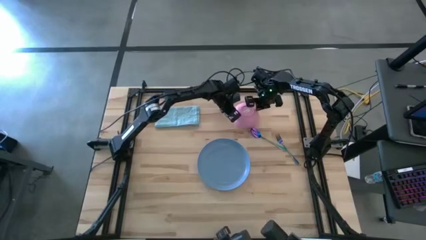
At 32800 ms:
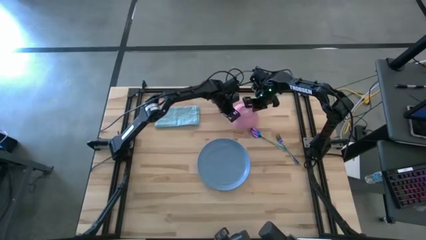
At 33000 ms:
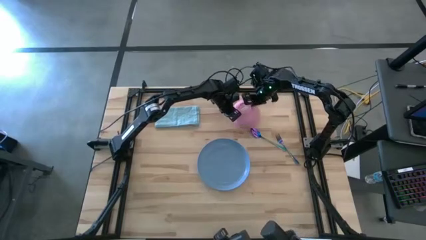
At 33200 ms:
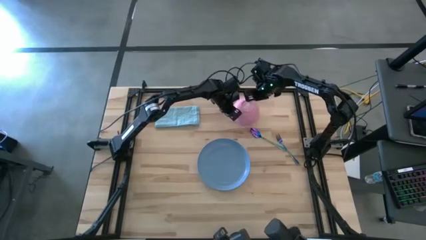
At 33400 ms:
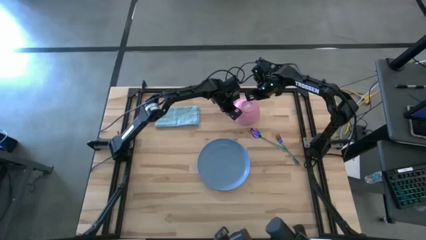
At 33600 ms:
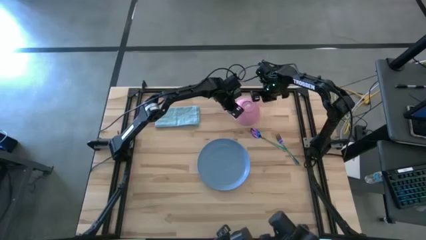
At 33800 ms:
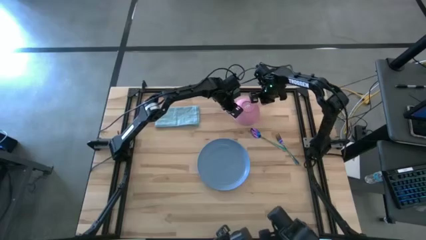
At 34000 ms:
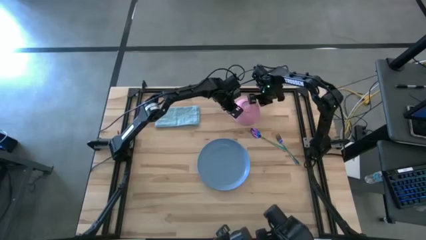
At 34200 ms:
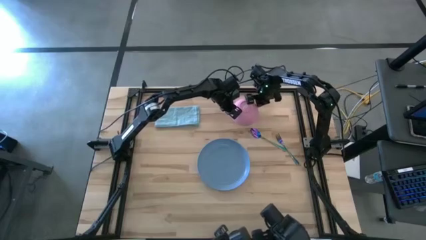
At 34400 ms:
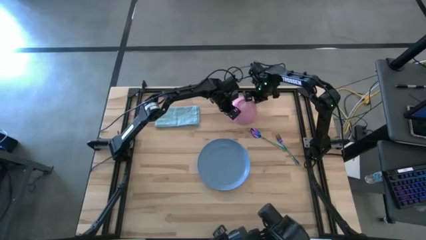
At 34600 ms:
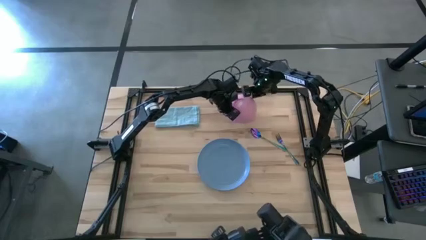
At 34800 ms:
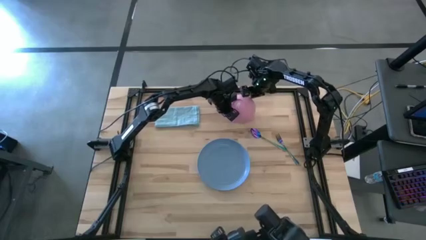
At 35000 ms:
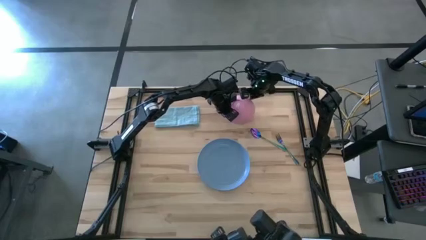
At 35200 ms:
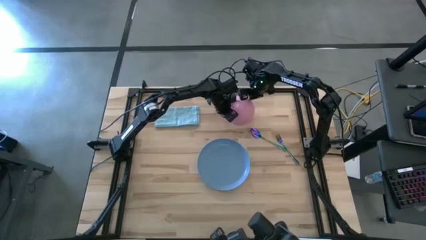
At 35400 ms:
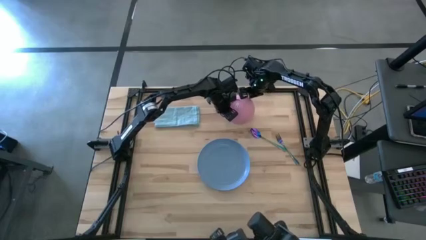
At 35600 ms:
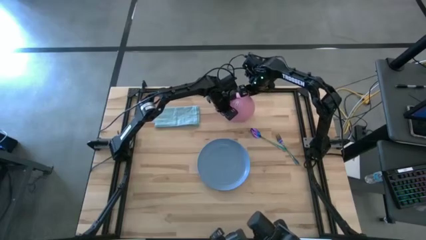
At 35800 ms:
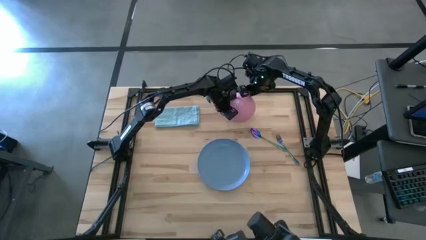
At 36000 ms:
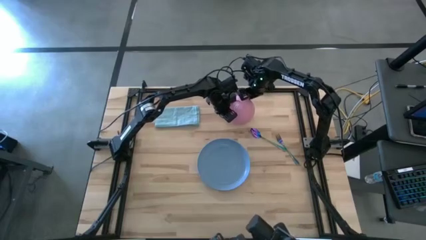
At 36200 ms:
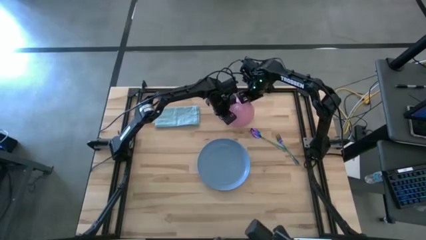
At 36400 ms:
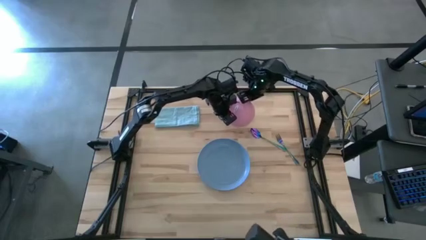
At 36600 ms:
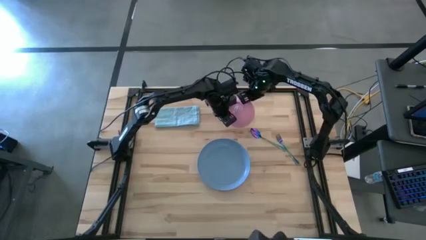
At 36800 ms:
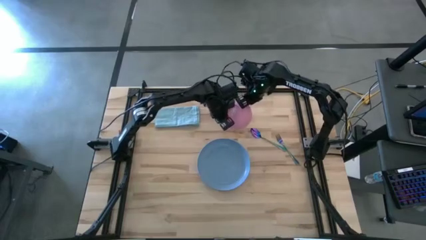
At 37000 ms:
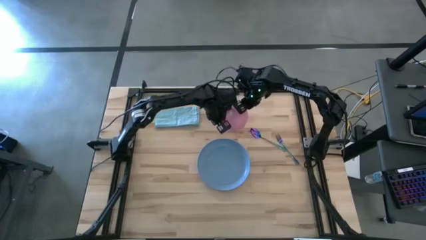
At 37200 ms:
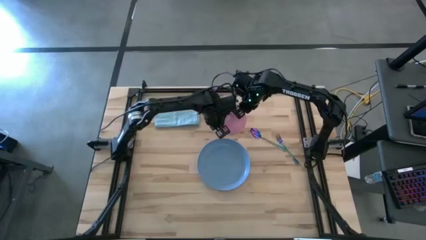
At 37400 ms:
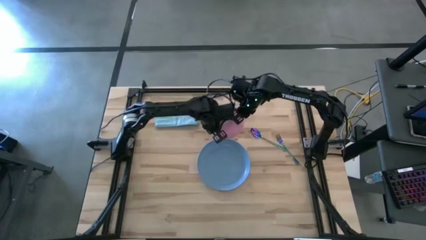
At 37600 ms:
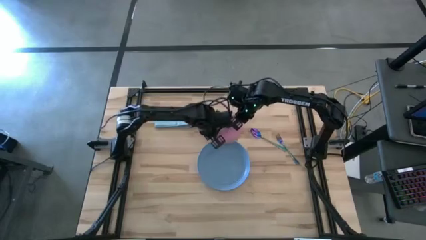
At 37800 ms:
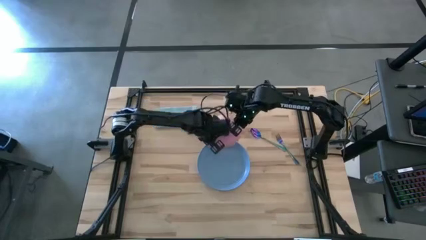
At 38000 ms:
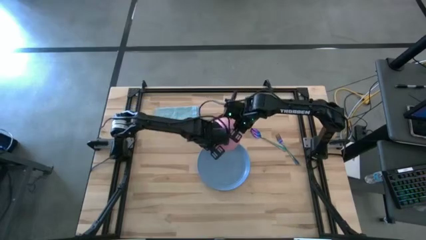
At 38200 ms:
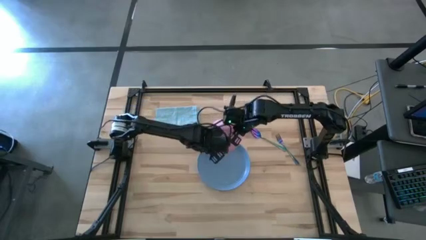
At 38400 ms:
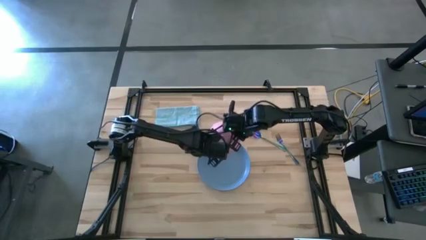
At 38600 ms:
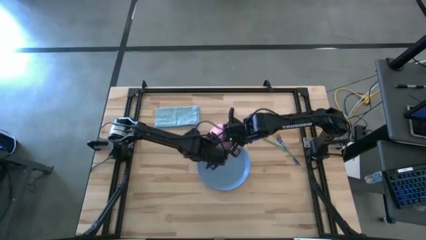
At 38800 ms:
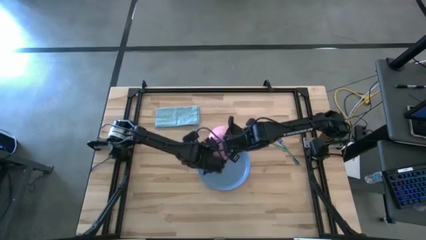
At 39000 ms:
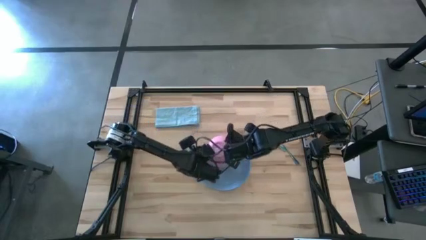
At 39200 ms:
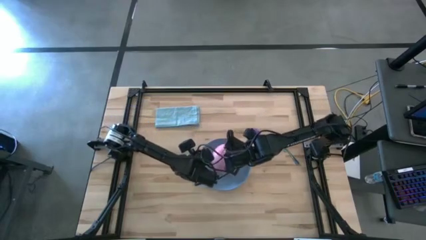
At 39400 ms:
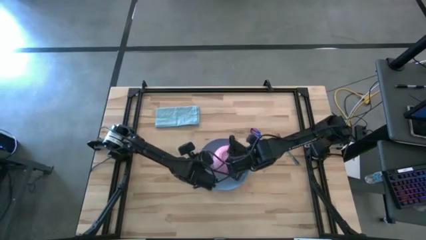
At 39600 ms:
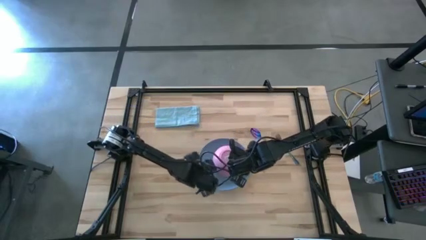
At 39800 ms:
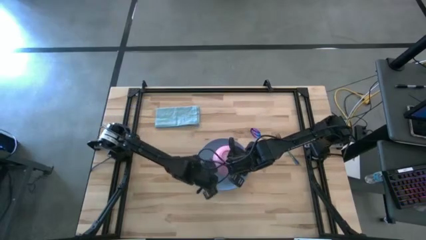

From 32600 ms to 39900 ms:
Task: Set table place
Put the pink bowl on top of the blue plate

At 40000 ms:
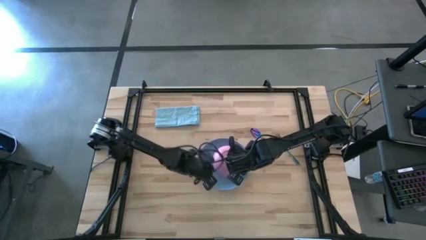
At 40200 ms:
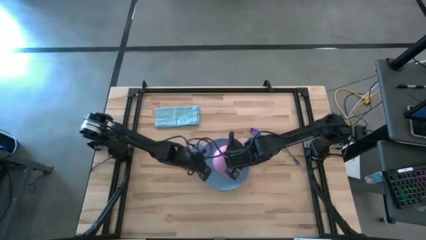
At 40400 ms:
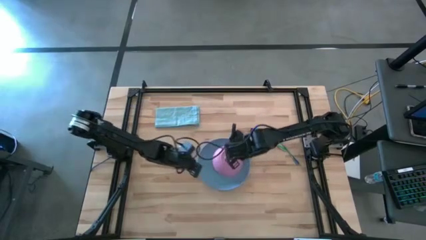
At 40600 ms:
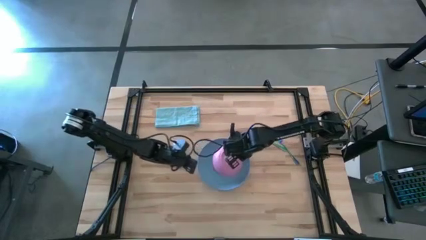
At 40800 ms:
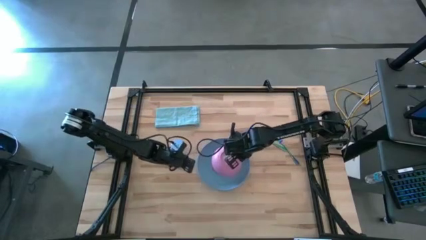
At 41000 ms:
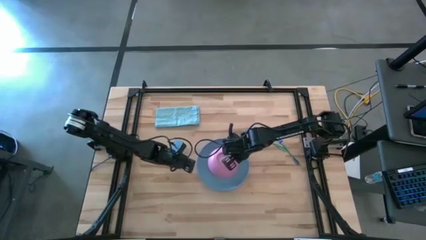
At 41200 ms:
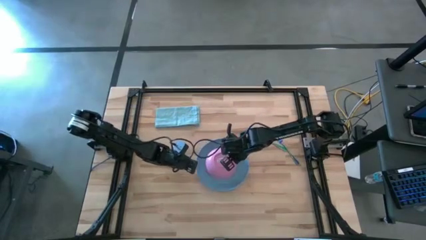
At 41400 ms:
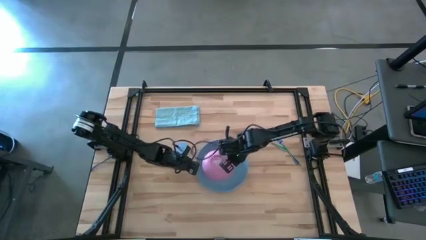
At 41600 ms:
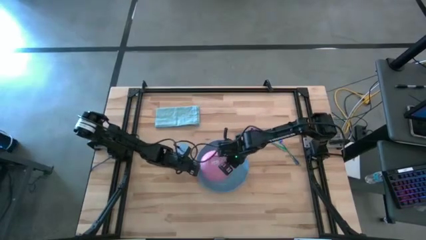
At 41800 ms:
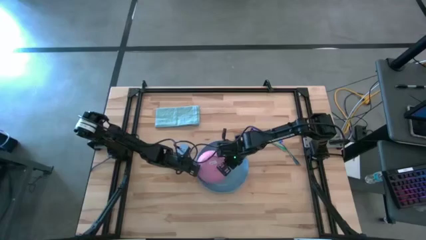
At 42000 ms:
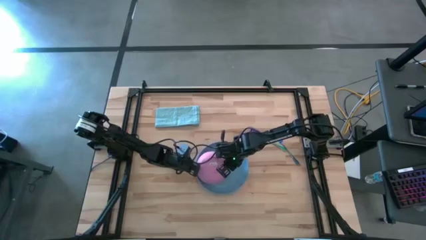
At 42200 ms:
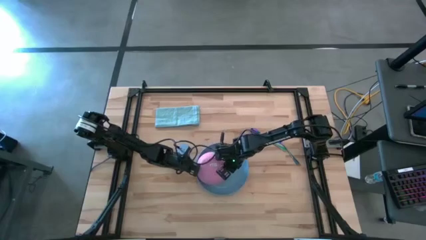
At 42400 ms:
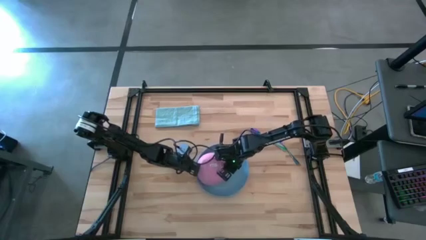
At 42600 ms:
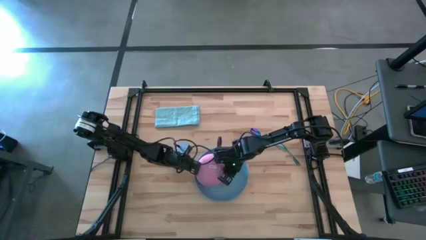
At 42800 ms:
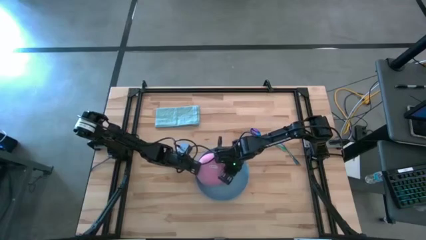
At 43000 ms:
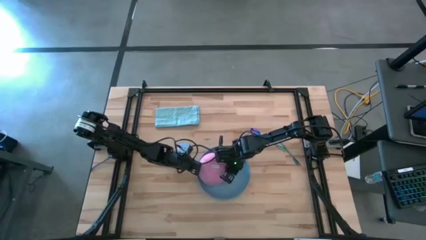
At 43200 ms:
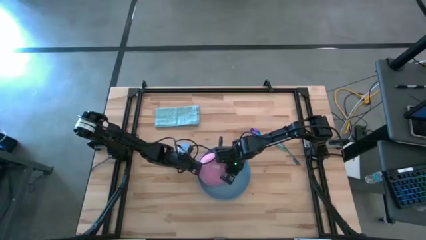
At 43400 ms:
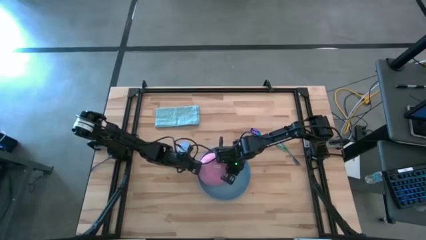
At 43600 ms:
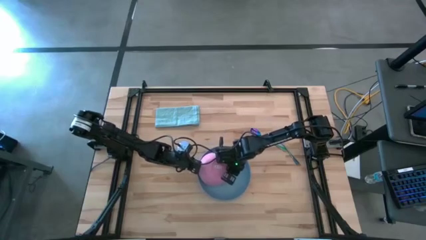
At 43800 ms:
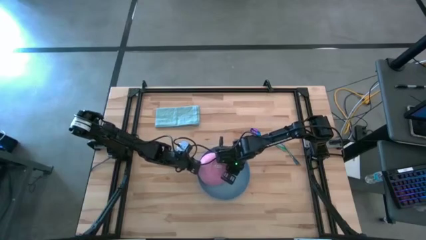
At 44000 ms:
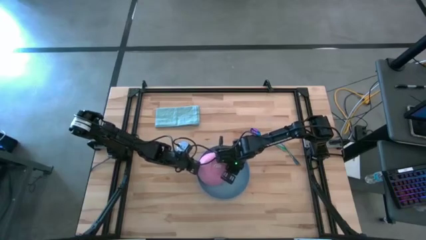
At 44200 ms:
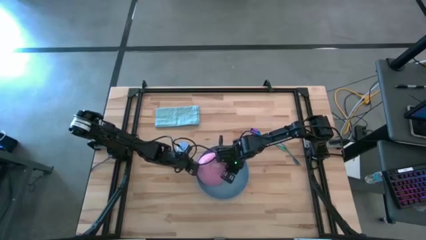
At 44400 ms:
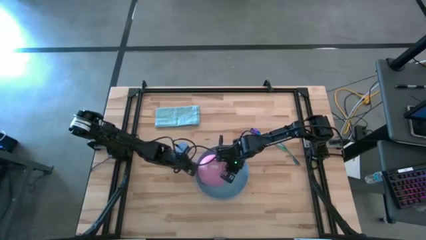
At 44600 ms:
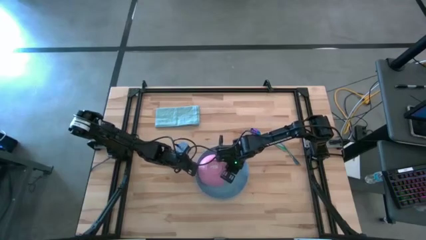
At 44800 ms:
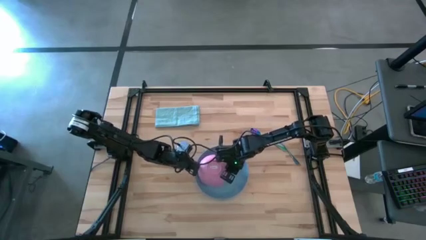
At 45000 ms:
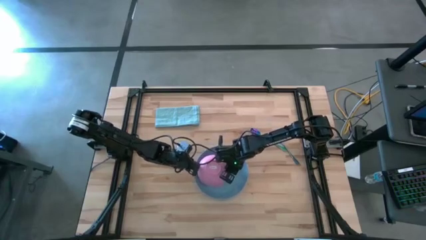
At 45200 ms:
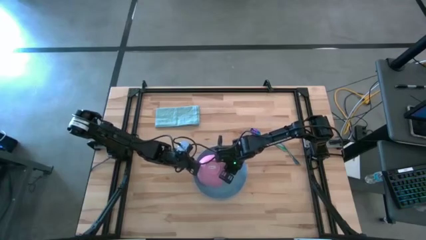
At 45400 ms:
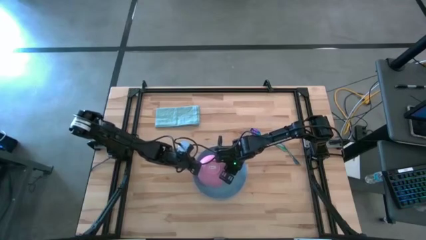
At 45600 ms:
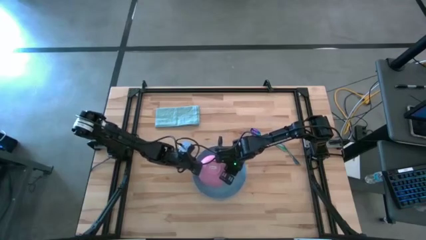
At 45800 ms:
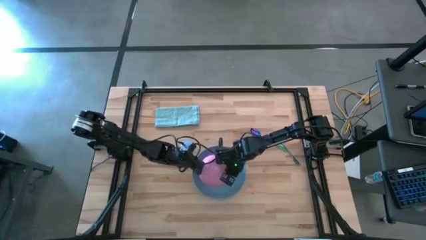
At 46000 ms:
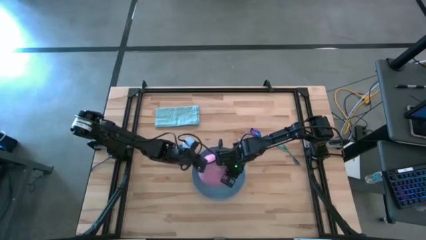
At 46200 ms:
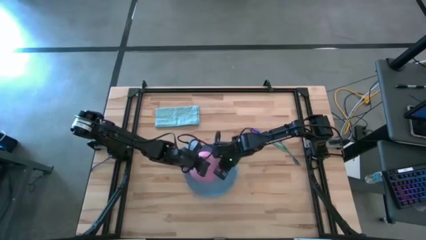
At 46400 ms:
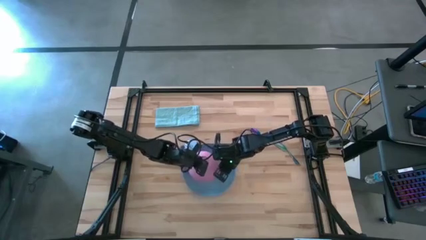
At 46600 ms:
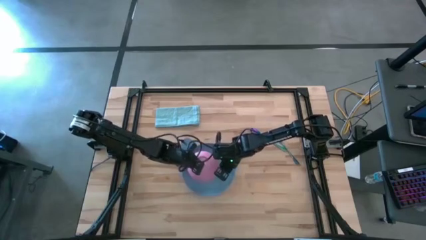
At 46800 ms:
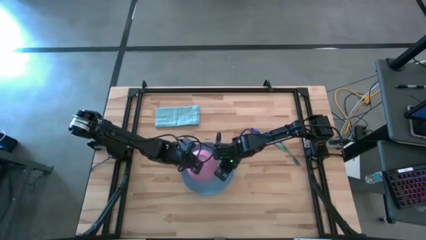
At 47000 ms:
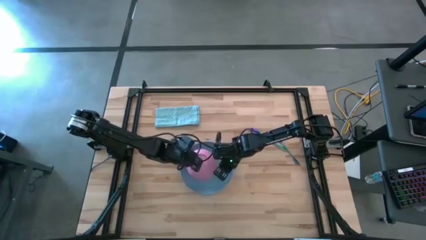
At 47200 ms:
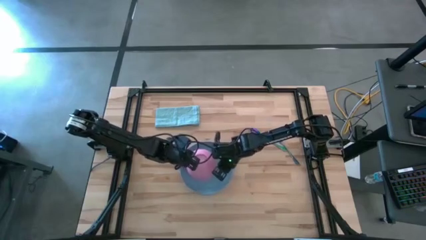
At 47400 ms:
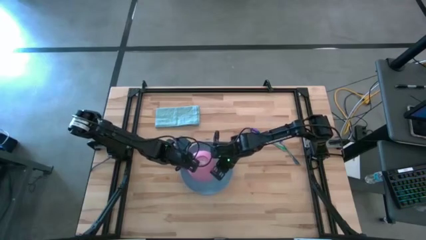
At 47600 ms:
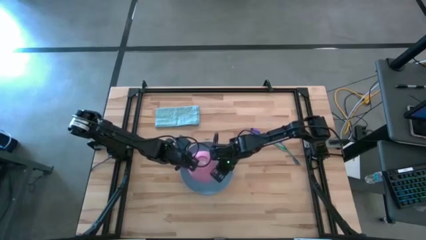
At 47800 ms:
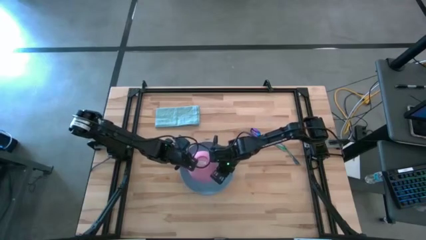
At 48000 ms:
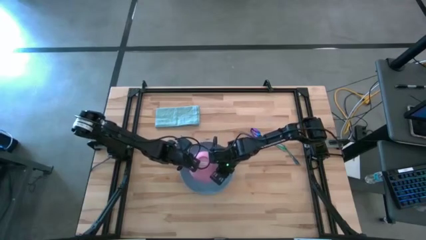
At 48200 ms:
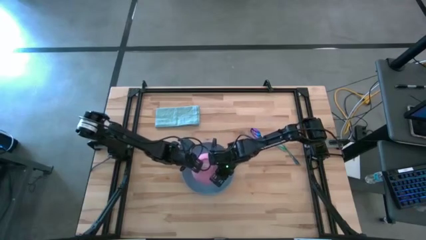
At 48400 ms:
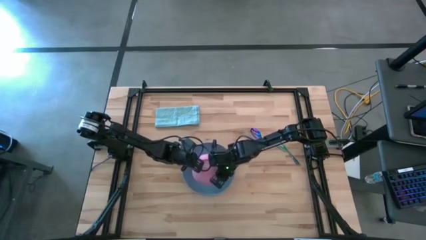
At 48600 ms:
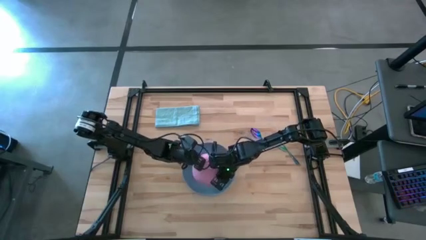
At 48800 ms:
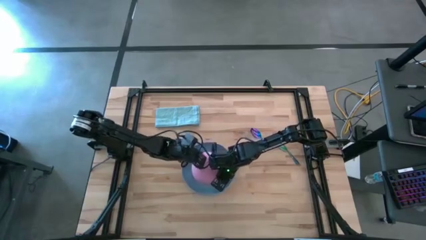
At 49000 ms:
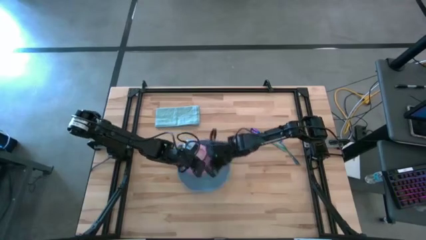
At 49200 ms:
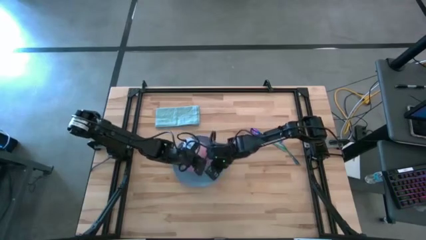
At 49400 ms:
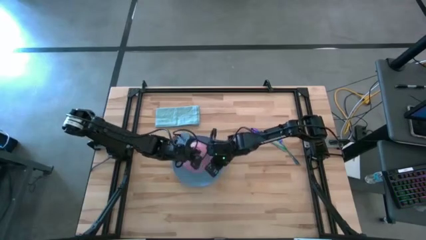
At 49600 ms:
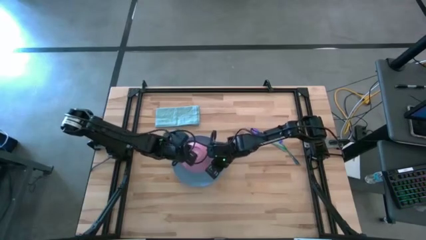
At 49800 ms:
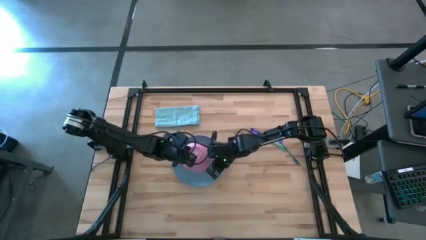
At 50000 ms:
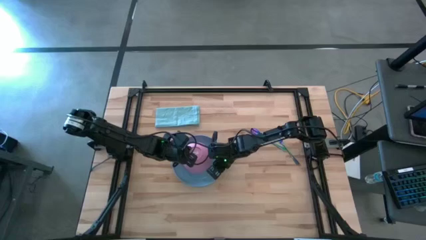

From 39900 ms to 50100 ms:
Adjust the position of the pink bowl upward
